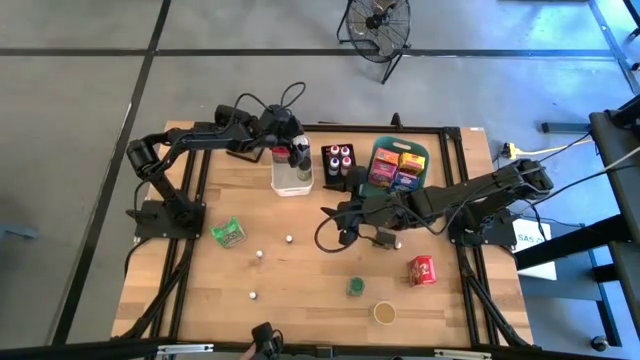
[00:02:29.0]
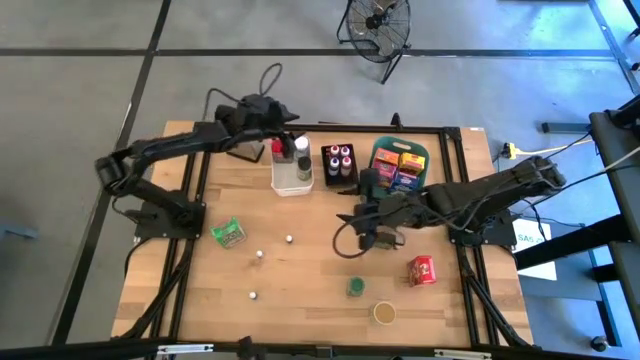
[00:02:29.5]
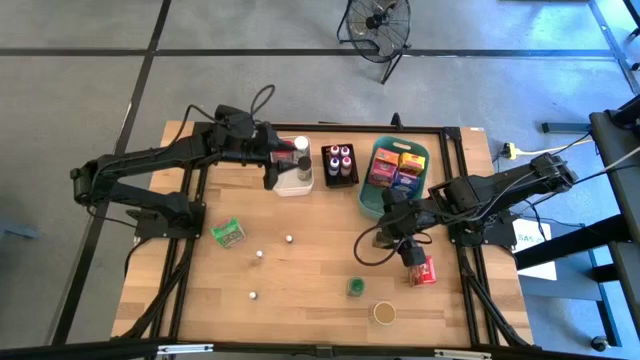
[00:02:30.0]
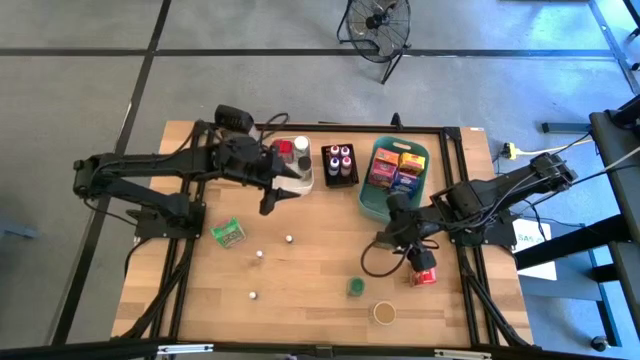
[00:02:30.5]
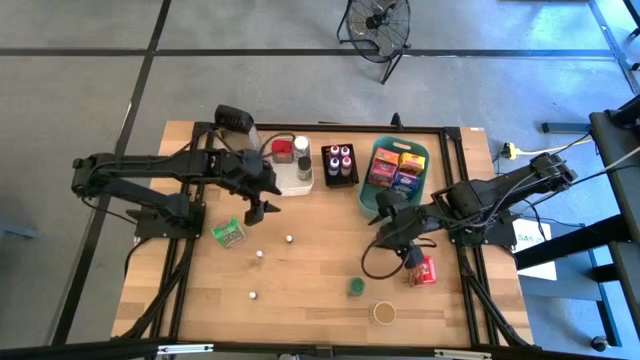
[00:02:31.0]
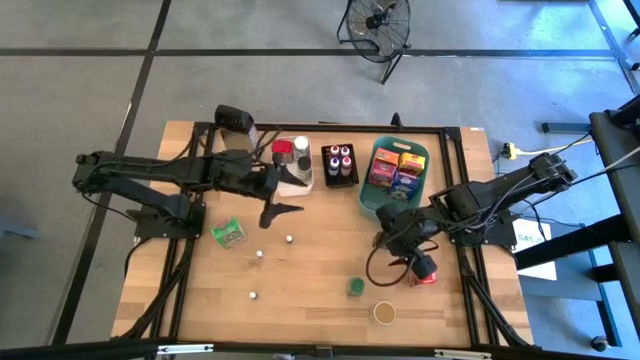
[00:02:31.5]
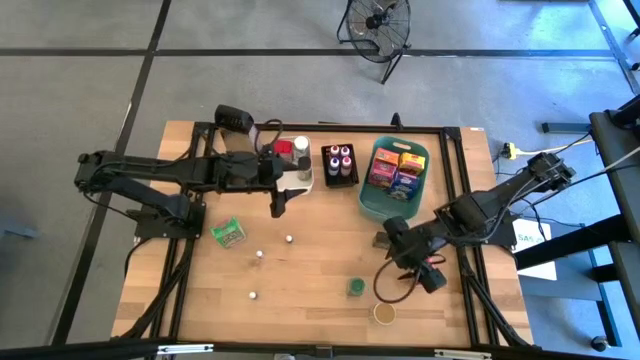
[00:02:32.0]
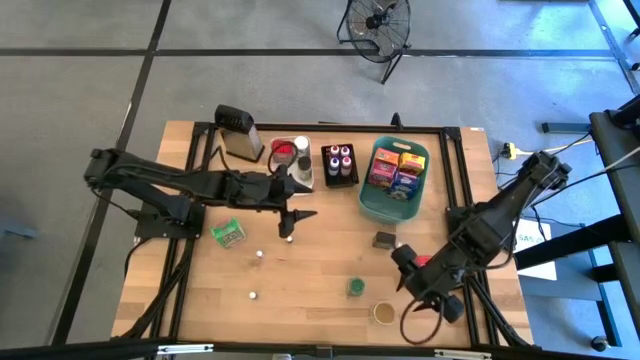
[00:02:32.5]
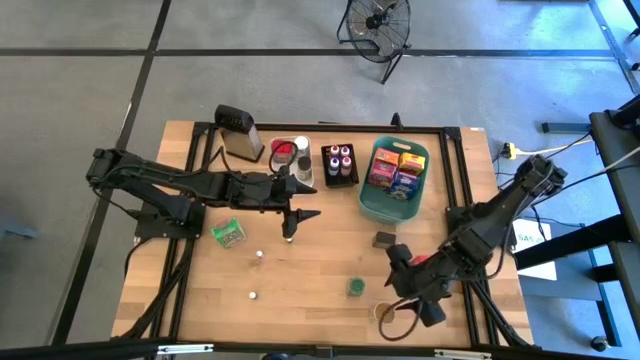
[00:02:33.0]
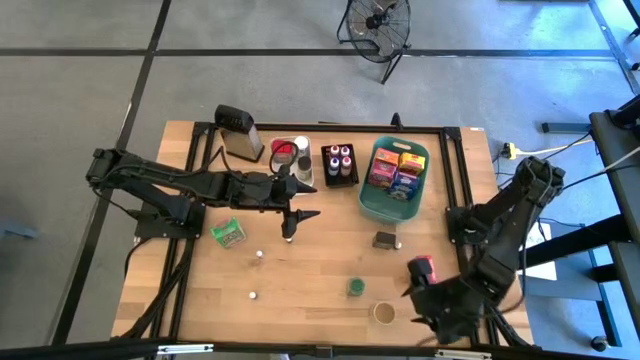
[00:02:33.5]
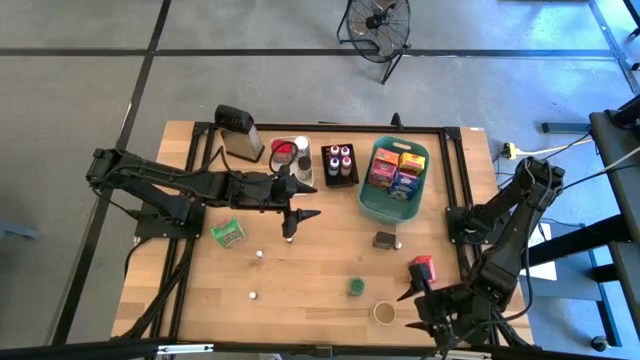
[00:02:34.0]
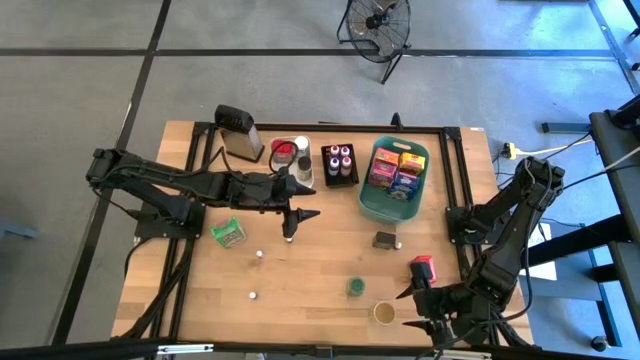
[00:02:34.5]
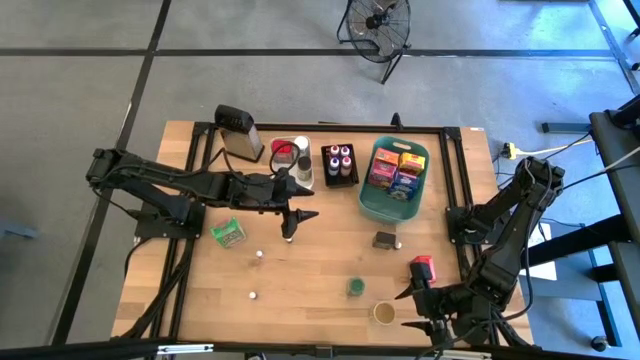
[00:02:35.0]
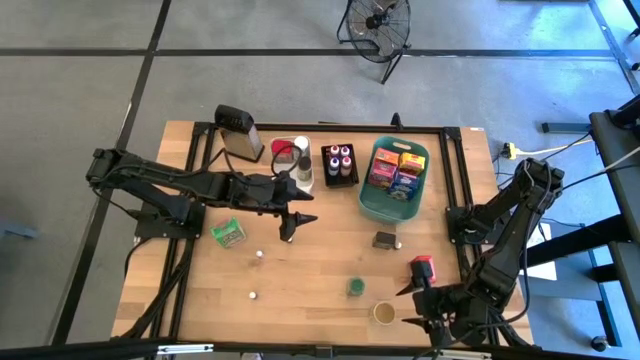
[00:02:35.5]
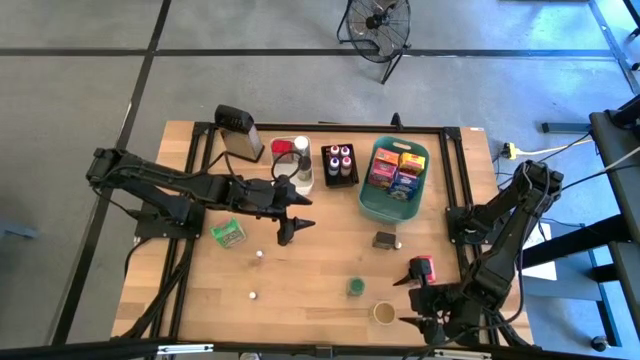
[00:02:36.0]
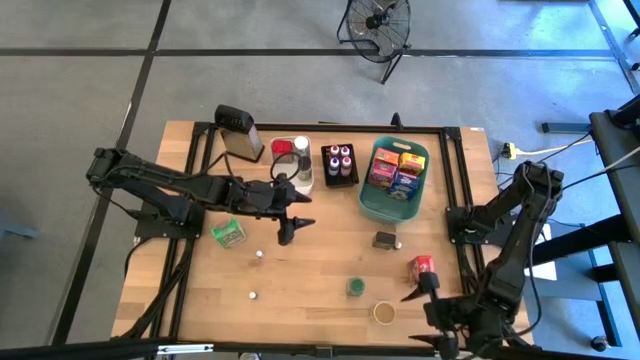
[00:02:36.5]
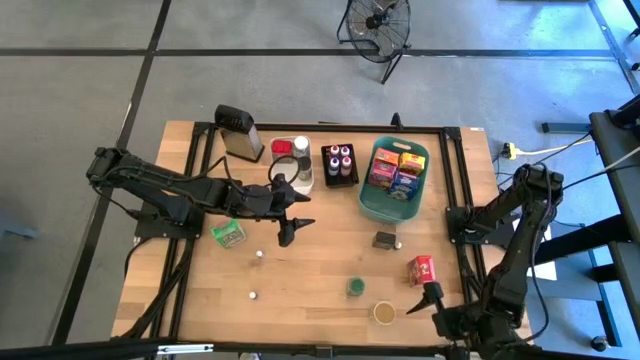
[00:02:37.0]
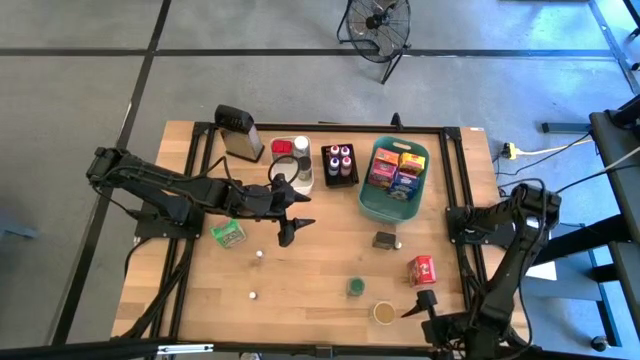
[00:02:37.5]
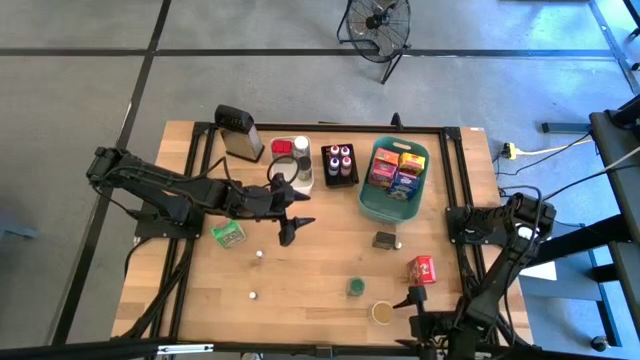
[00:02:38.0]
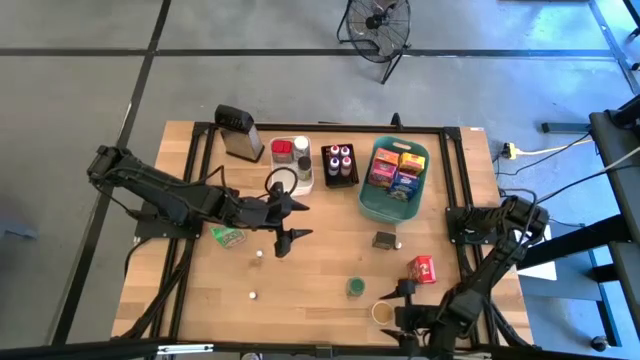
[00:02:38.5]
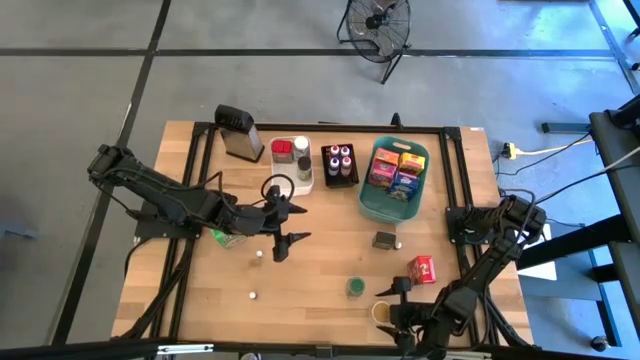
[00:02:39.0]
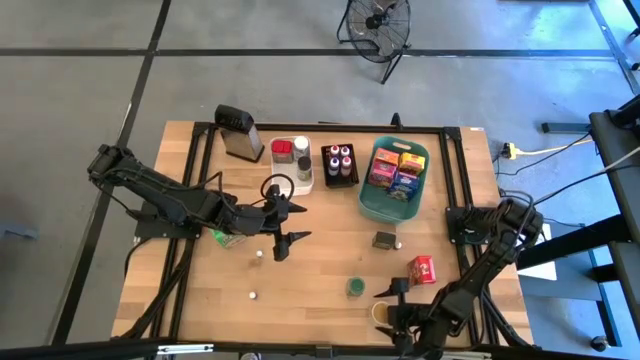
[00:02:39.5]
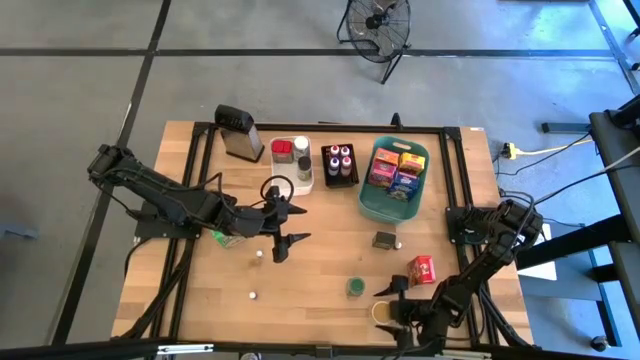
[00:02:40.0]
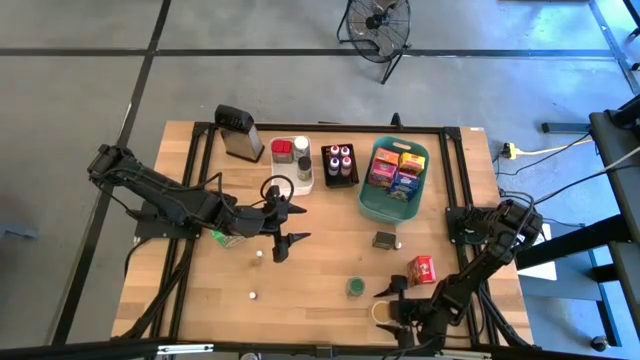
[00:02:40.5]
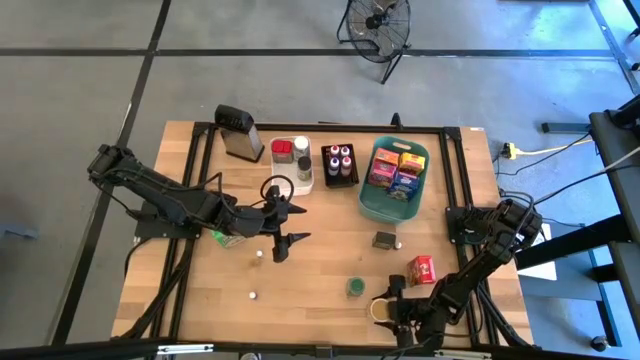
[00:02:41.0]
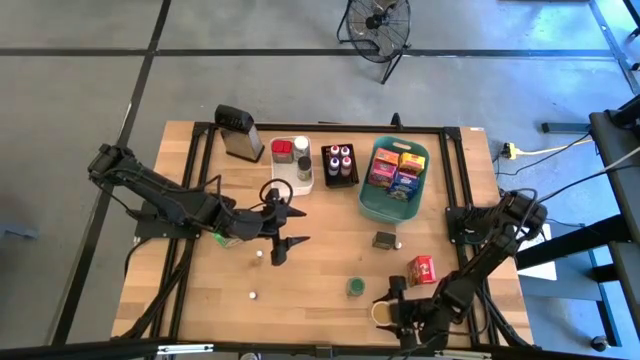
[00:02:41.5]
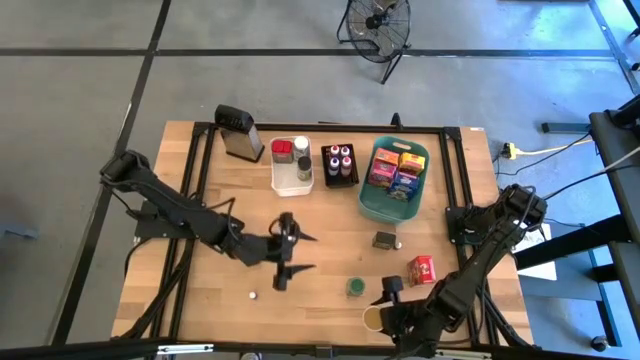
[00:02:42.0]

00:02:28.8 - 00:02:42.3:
Task: Pick & Place Kitchen Items
Put the light brown spice bottle into the white bin

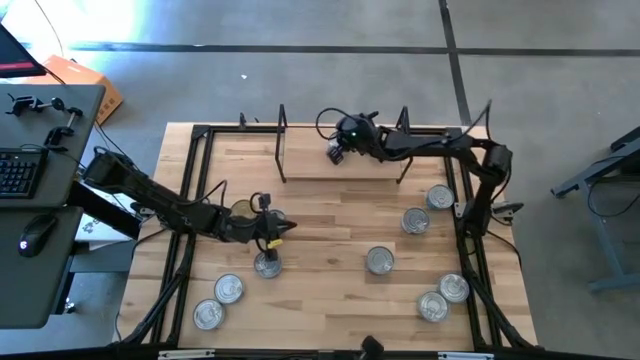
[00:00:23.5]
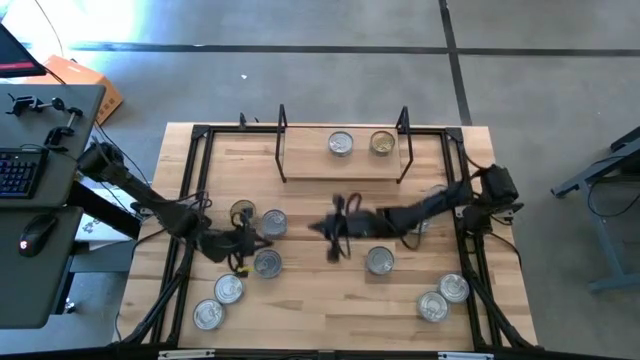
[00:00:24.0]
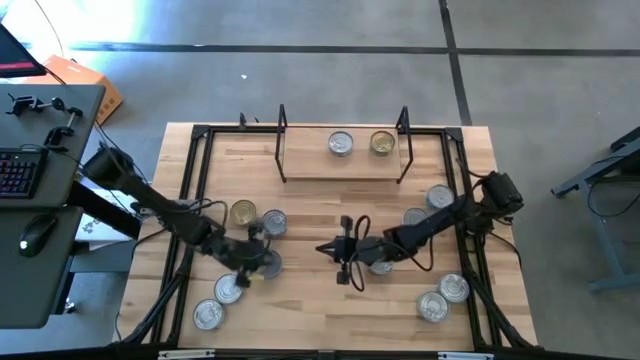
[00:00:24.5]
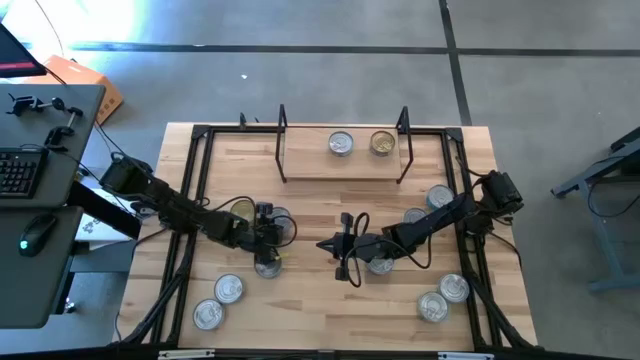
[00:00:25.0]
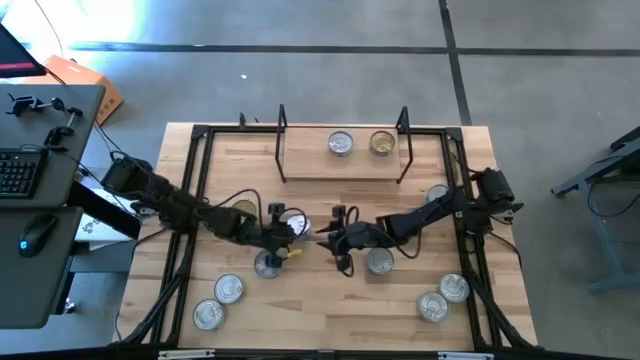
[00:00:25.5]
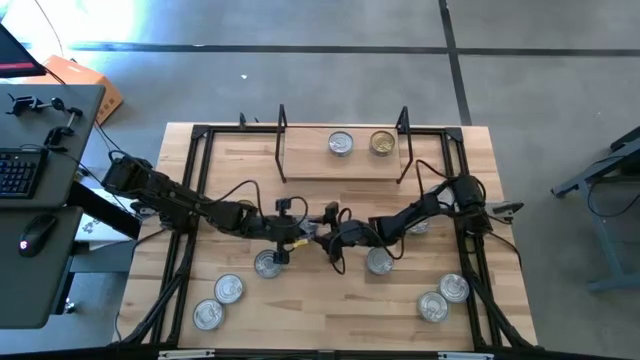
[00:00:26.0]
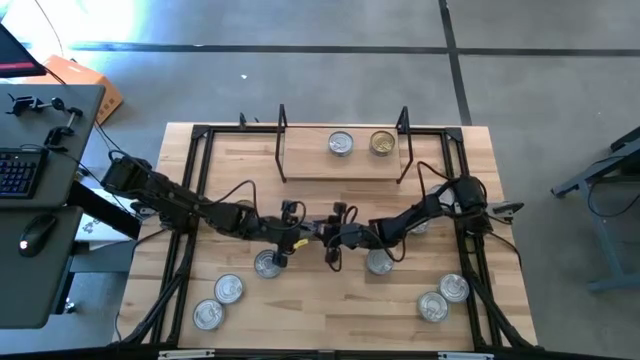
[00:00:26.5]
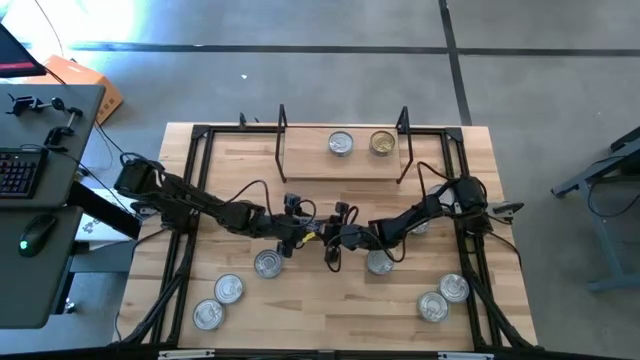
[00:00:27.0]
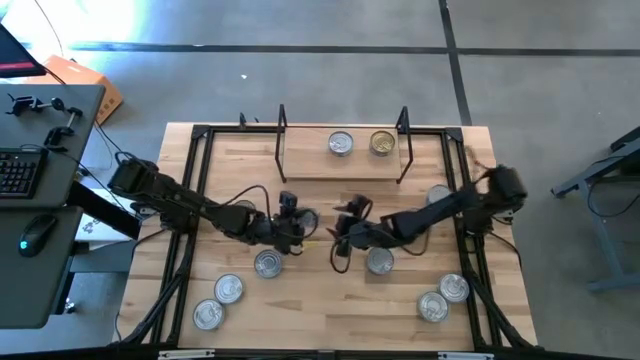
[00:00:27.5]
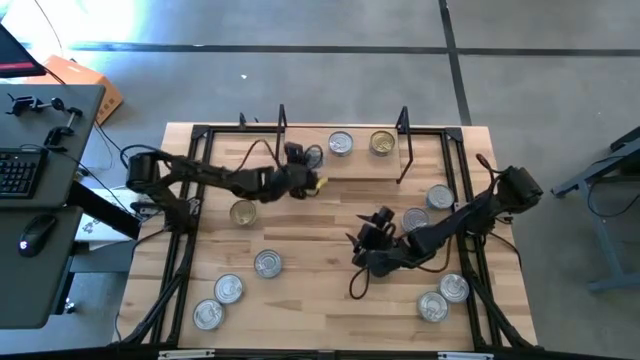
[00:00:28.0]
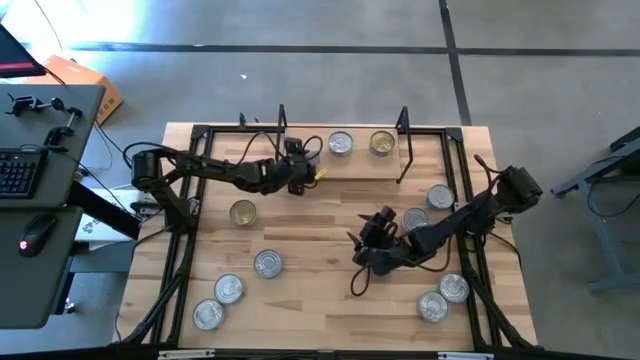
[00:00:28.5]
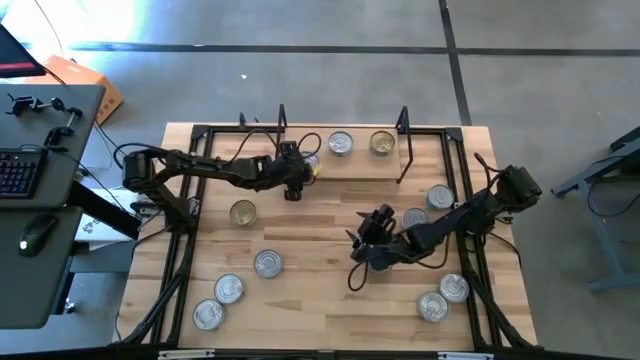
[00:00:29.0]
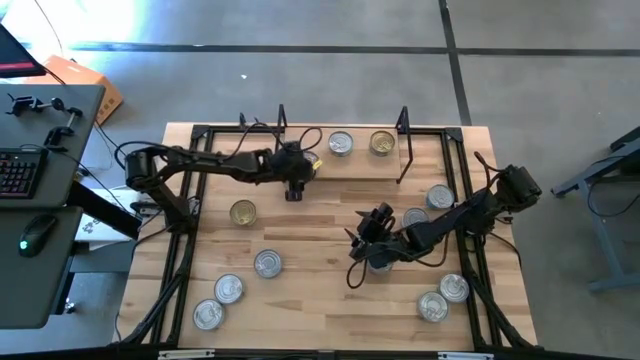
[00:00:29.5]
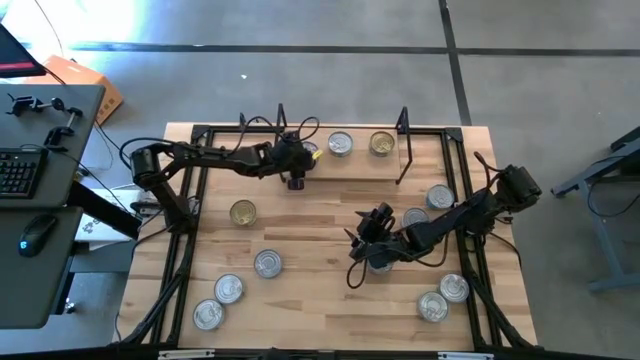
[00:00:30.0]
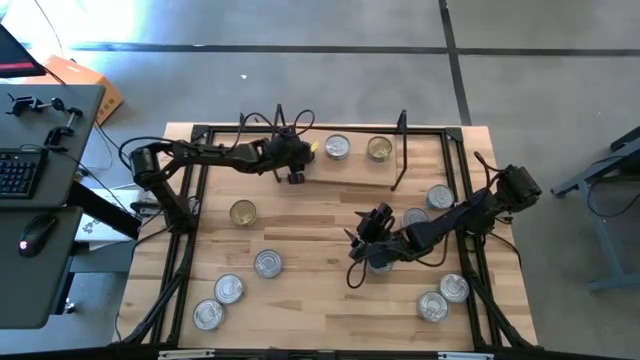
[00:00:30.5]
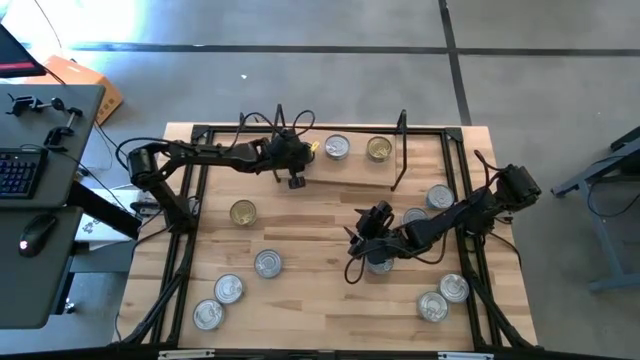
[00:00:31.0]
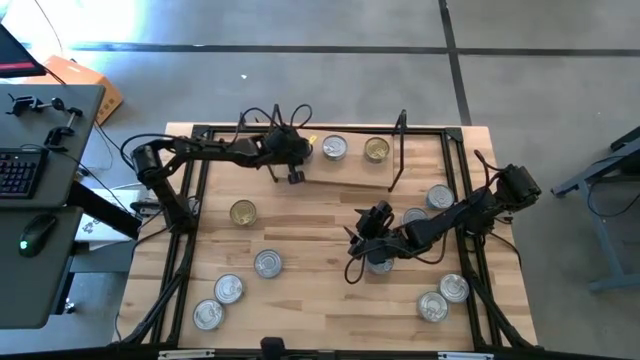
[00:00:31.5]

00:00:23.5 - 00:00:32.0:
Task: Stack canned seafood by type on shelf
Put the blue tuna can on the shelf
